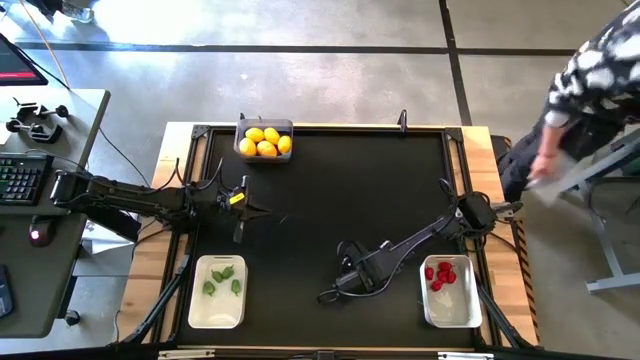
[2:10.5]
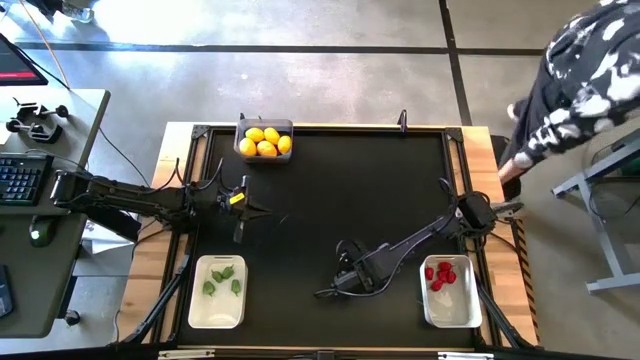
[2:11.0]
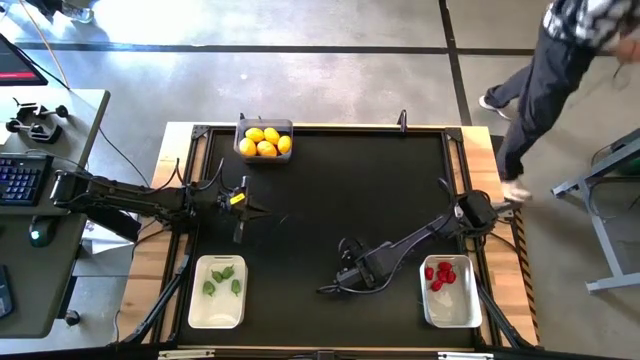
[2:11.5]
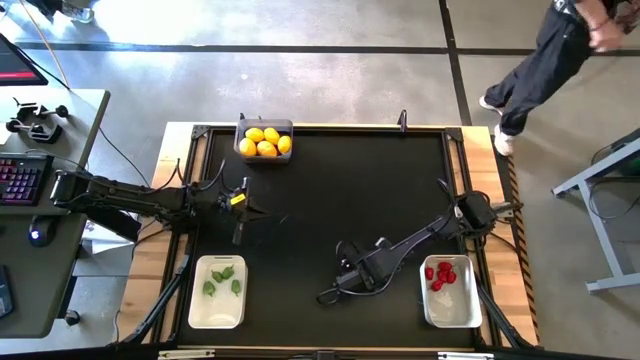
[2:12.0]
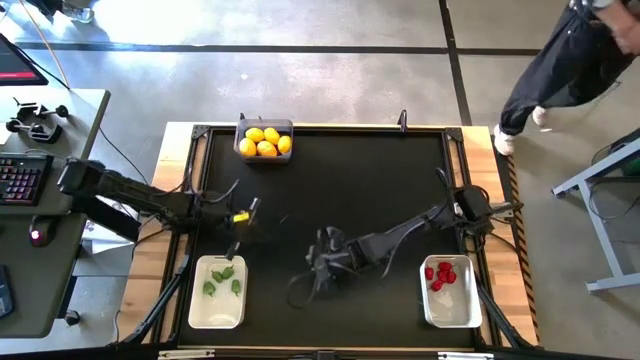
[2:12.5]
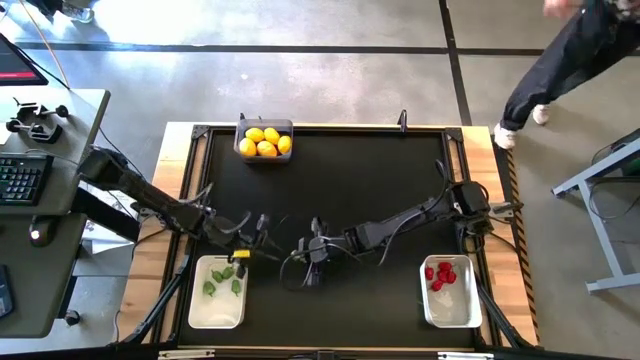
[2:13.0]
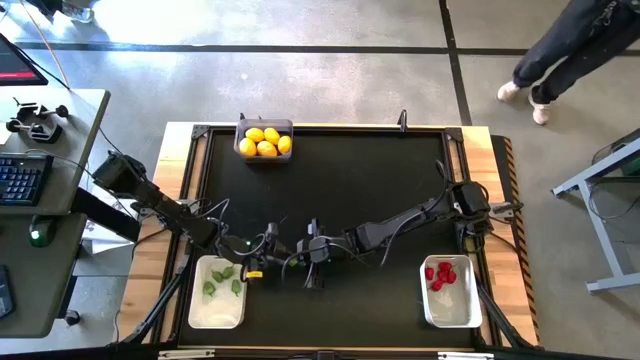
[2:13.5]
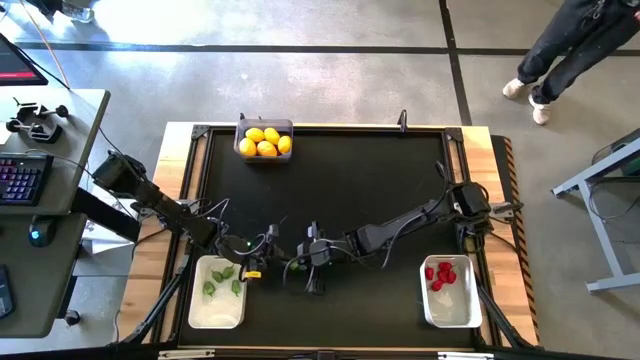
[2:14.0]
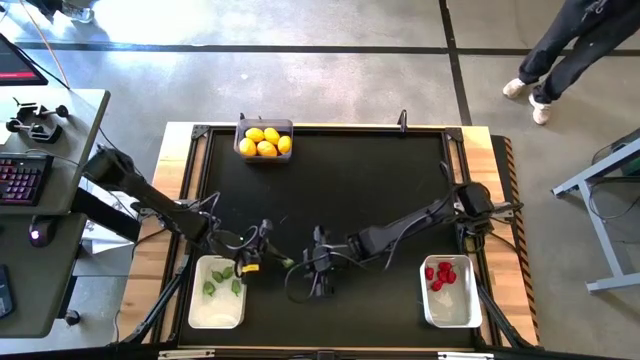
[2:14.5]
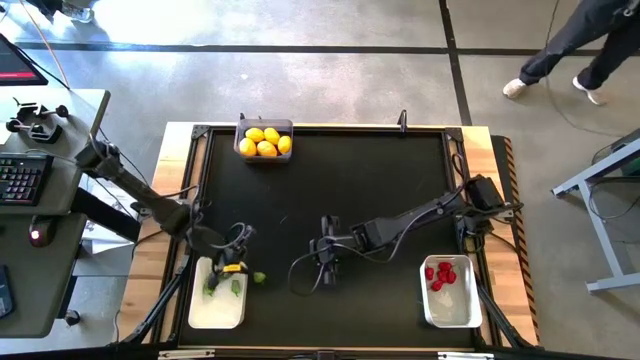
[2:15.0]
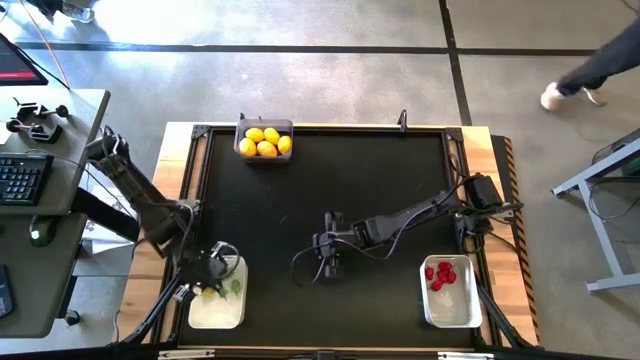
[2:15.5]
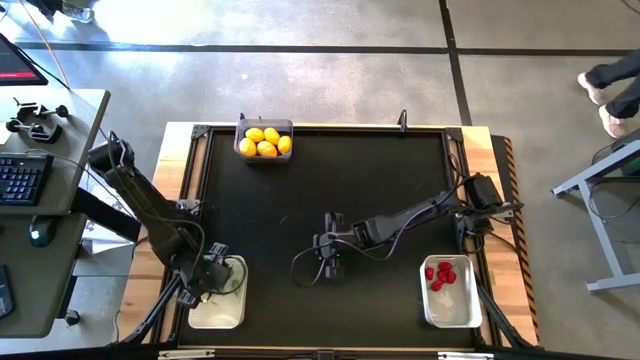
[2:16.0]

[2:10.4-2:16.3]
Task: Sort produce into baskets
Put the green chili pepper into the white bin

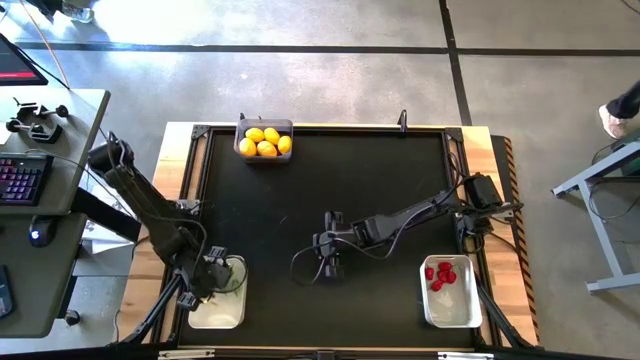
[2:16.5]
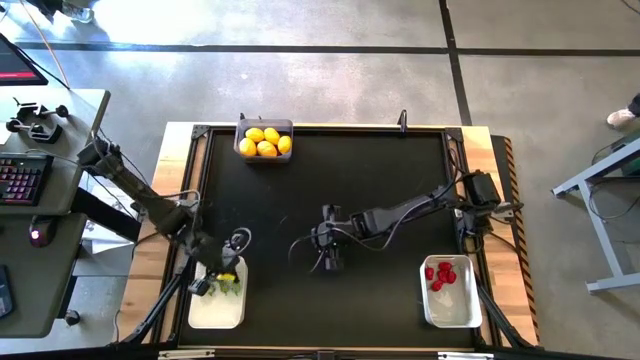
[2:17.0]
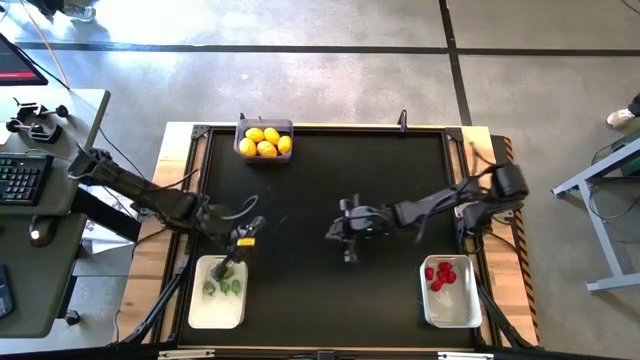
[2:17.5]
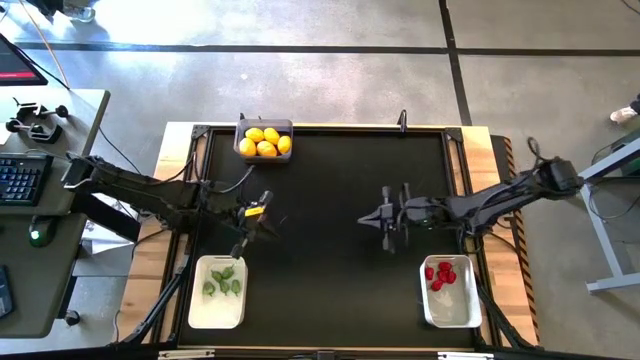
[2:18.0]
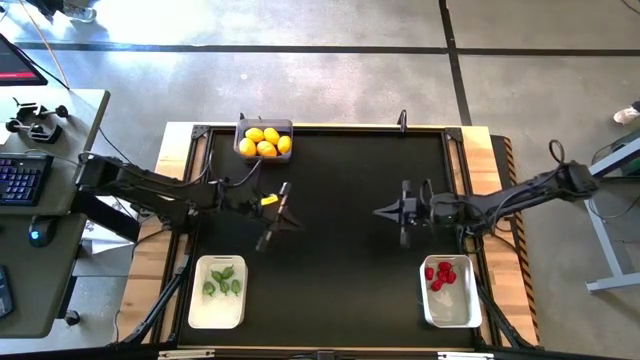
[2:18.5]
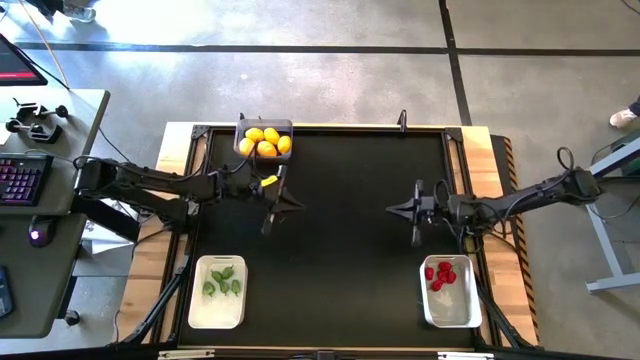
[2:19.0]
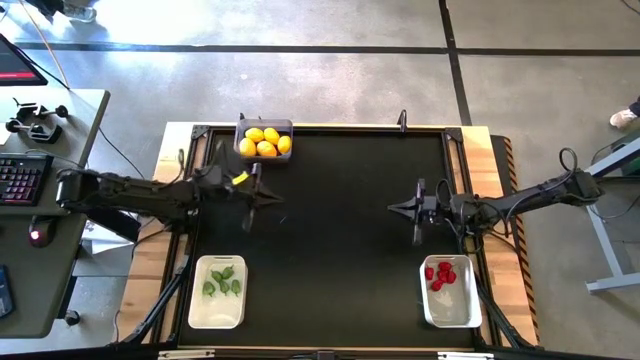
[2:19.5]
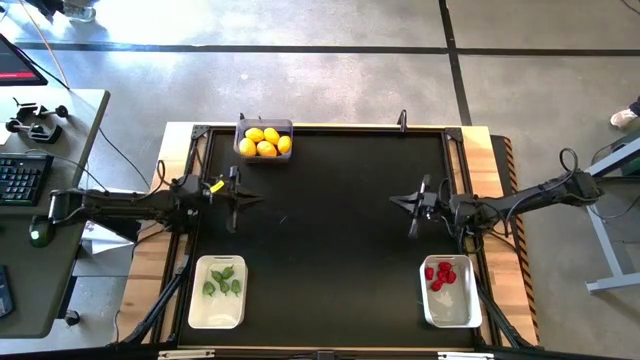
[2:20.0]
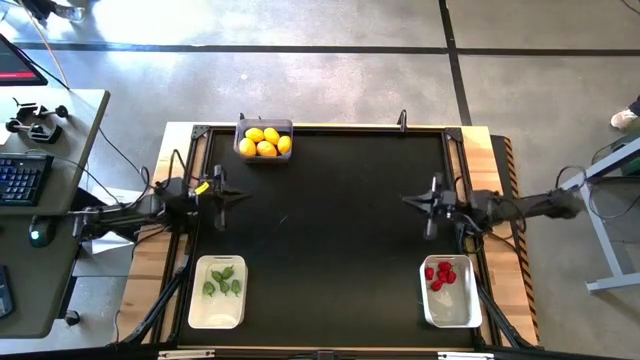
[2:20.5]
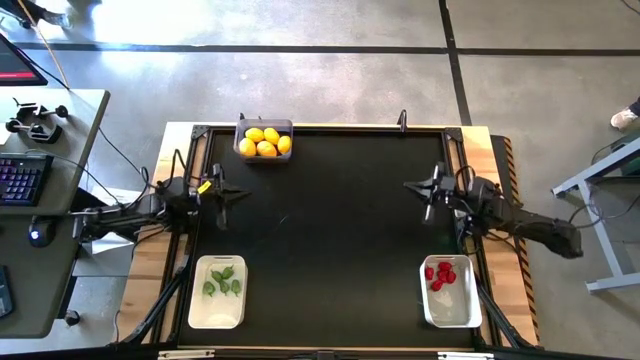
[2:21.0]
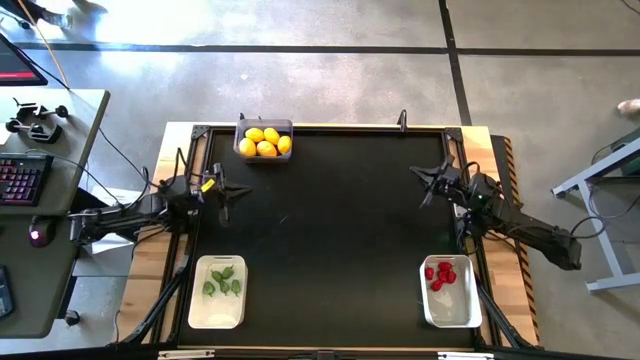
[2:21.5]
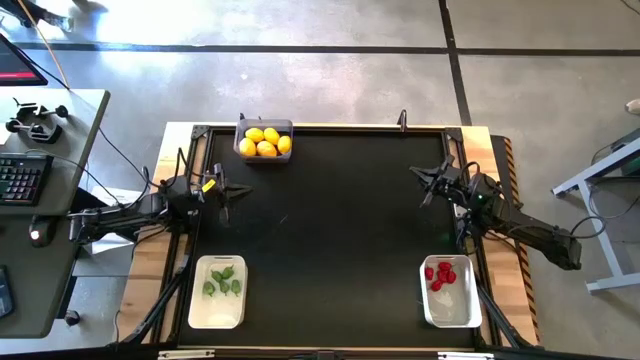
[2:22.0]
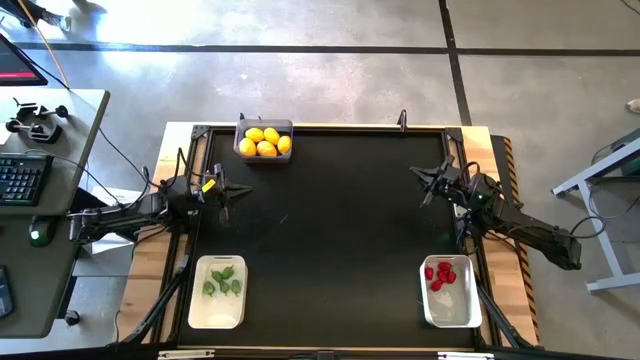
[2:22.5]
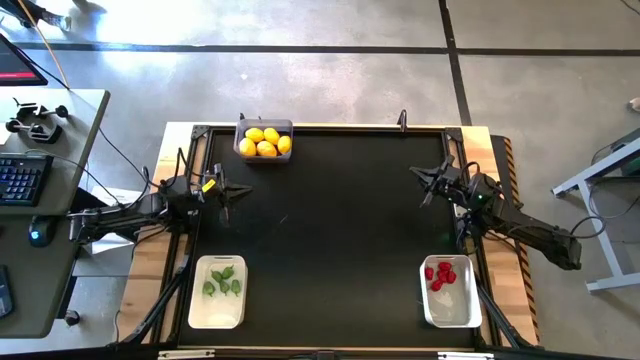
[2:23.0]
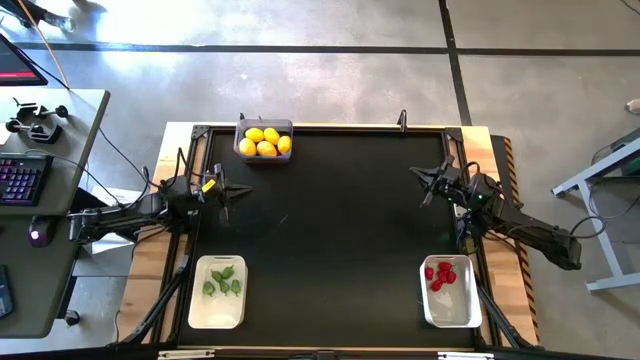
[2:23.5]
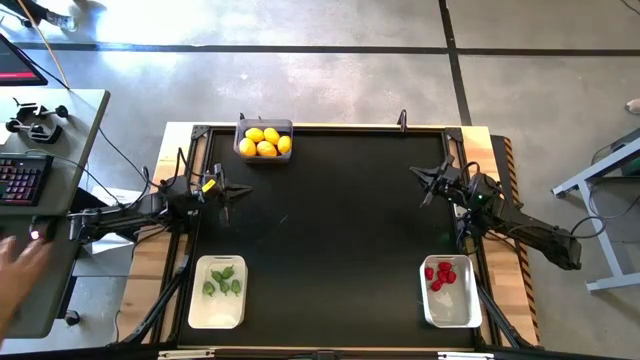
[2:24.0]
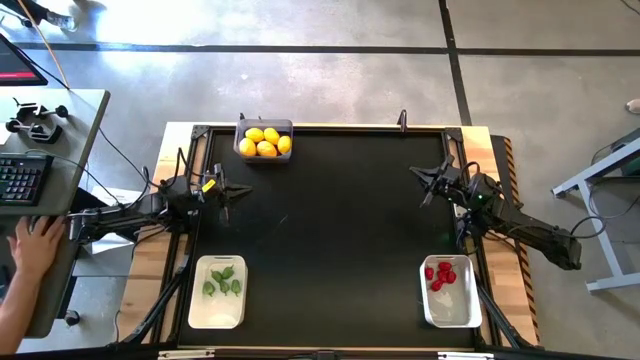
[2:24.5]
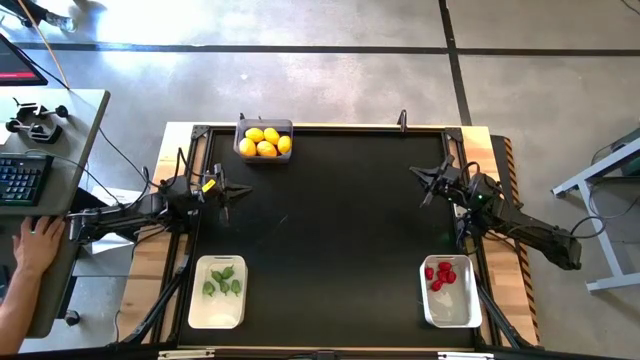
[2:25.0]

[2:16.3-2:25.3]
Return to Home Position

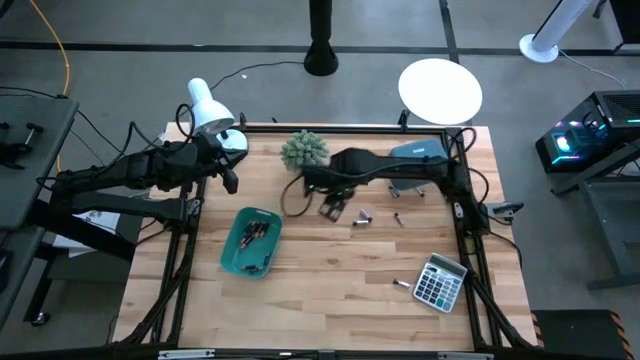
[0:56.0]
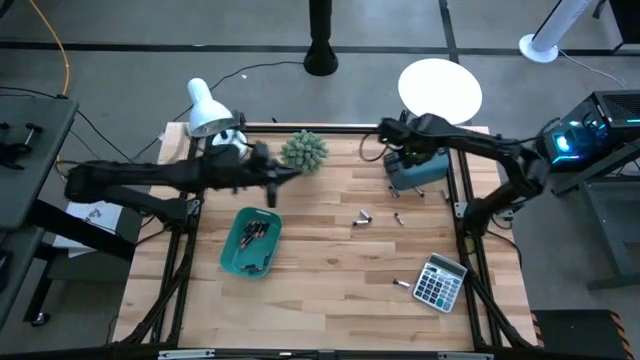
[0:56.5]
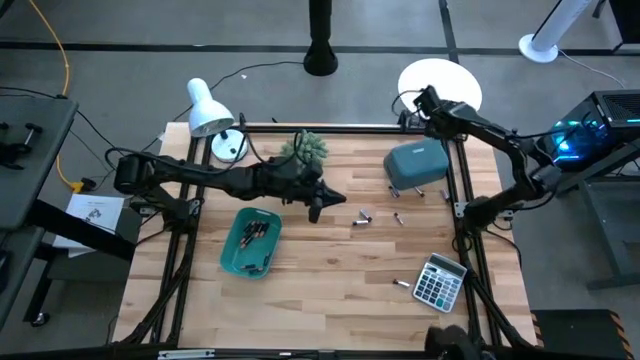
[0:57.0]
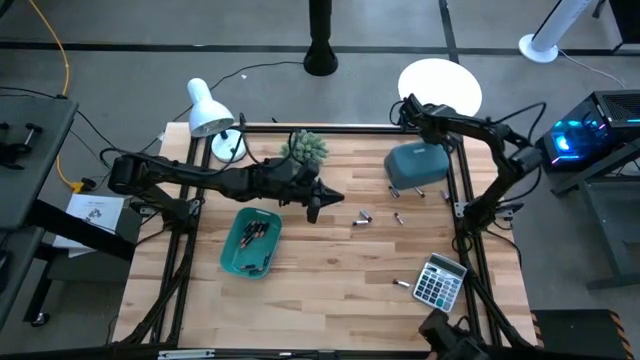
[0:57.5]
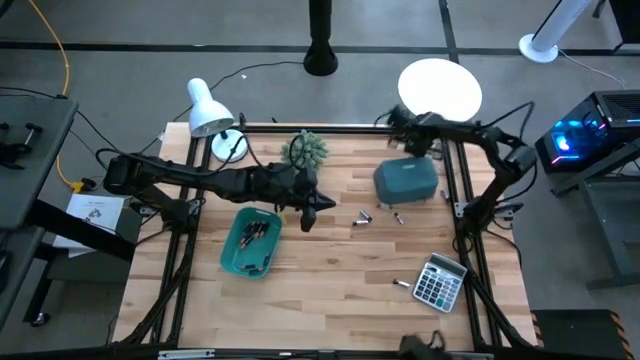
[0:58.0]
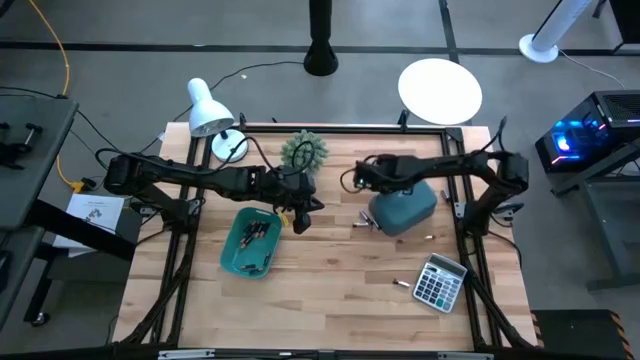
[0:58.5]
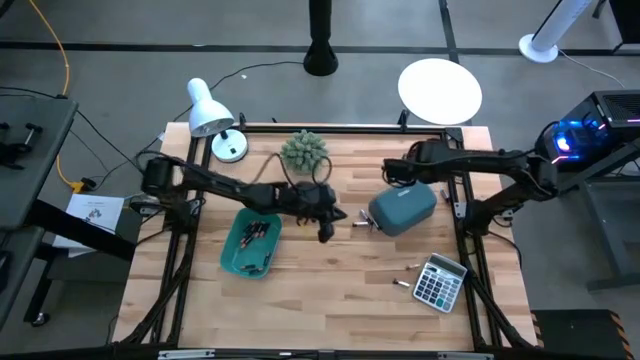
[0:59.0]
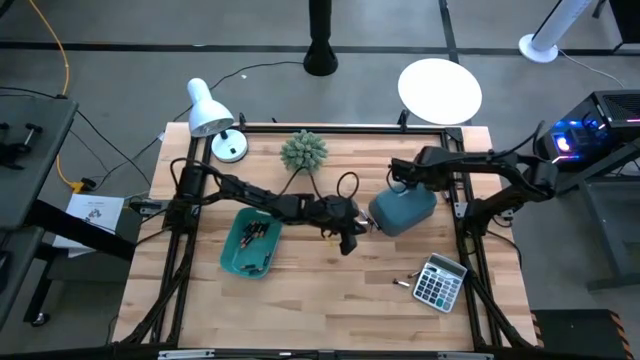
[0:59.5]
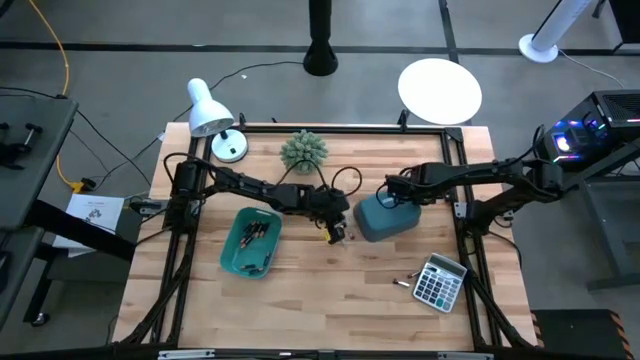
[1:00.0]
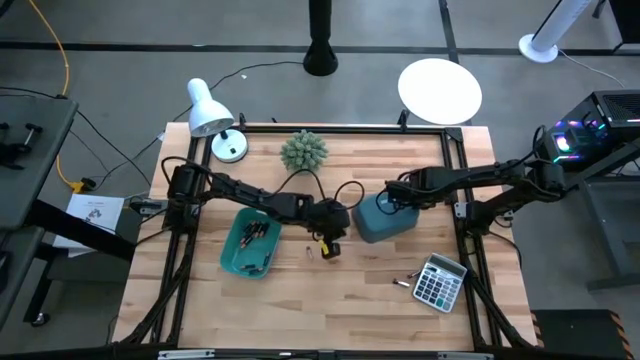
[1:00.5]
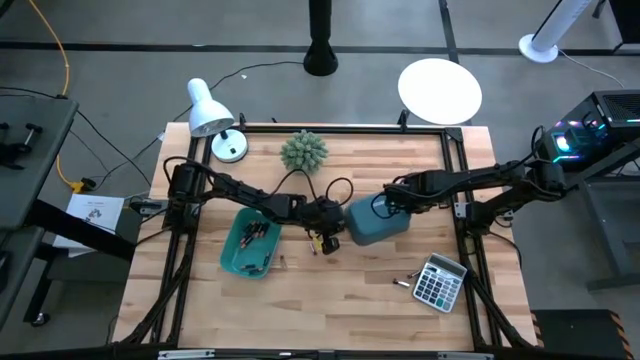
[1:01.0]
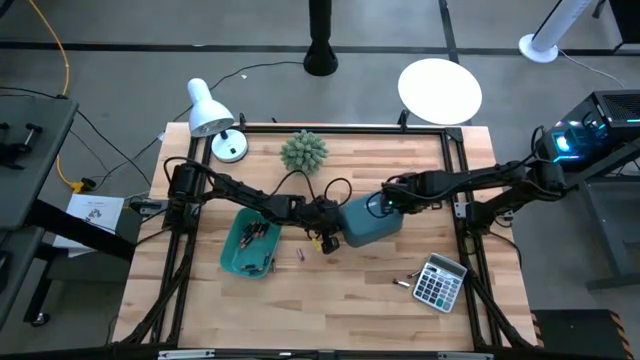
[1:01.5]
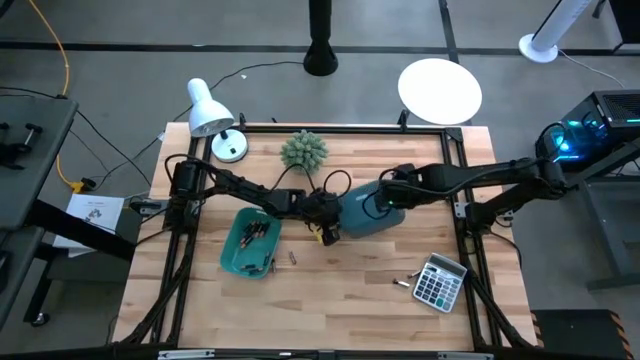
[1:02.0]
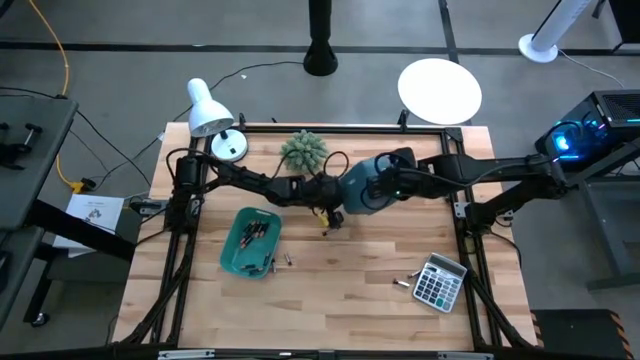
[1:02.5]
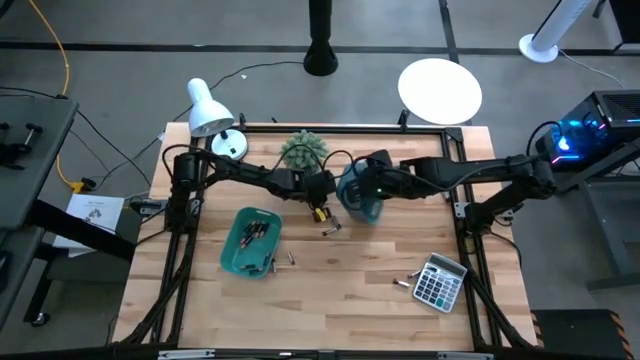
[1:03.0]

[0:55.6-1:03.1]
Task: Sort batteries
Prepare the blue bin for the white batteries
